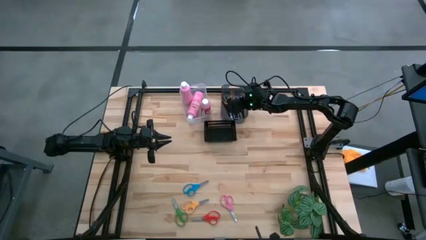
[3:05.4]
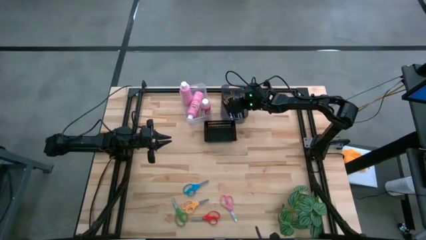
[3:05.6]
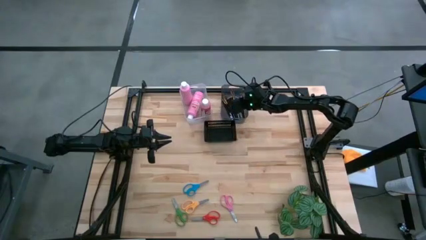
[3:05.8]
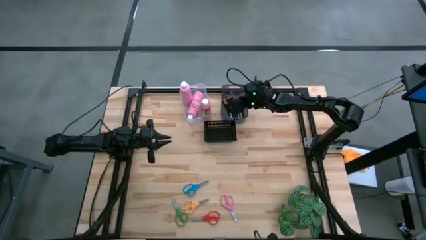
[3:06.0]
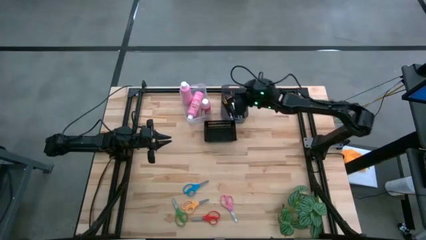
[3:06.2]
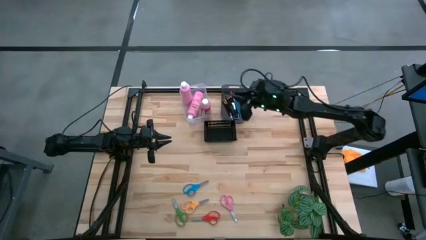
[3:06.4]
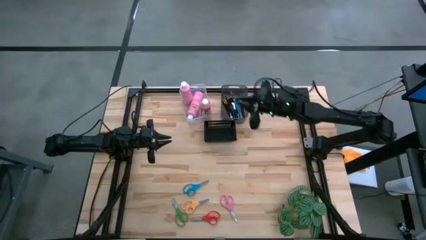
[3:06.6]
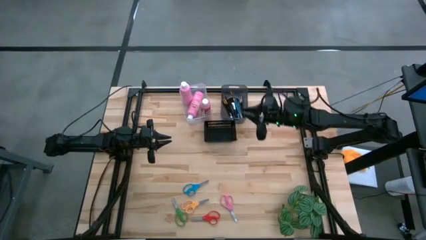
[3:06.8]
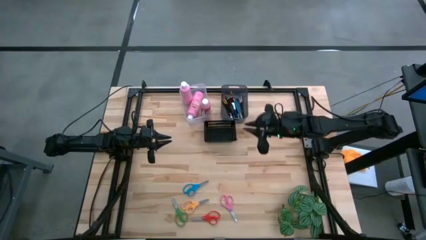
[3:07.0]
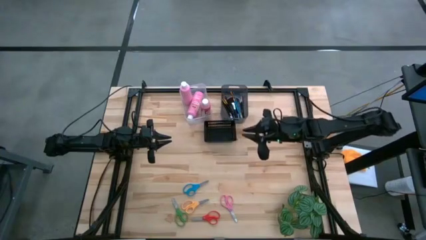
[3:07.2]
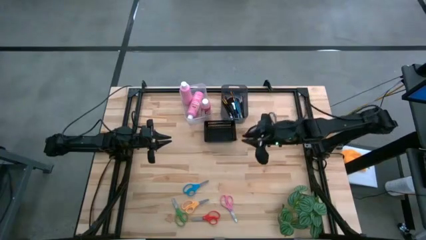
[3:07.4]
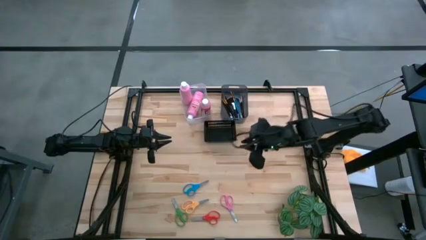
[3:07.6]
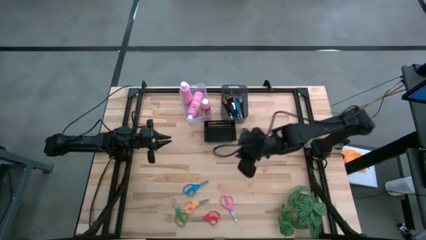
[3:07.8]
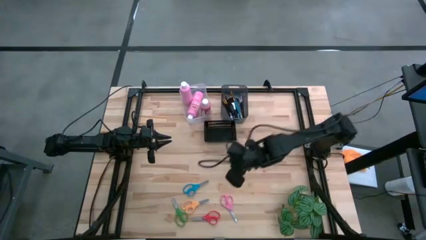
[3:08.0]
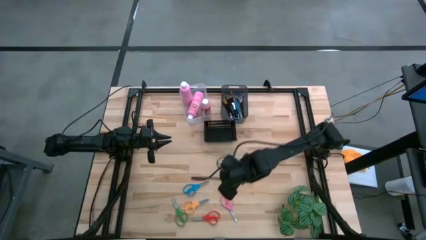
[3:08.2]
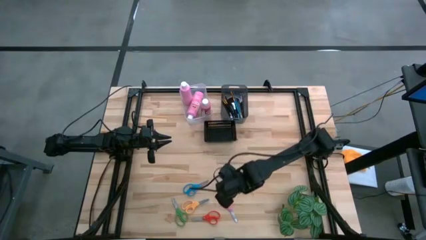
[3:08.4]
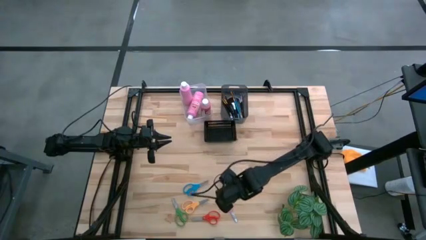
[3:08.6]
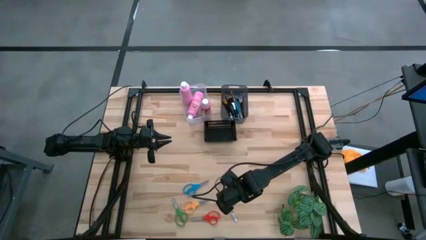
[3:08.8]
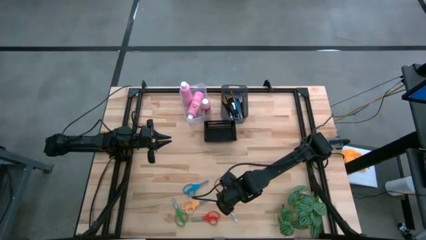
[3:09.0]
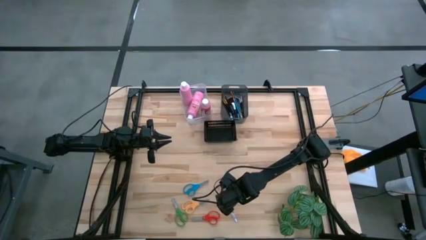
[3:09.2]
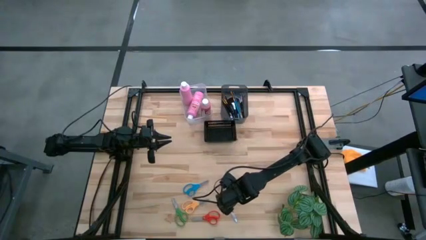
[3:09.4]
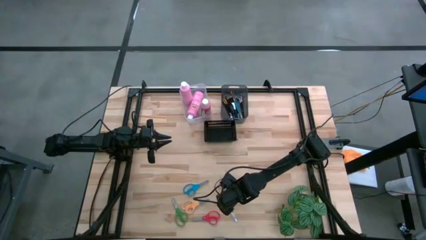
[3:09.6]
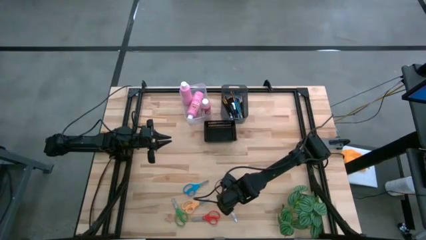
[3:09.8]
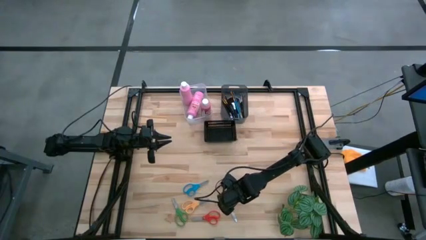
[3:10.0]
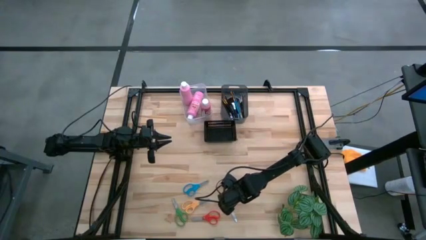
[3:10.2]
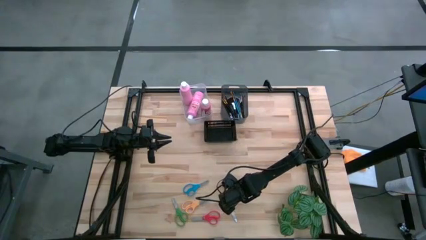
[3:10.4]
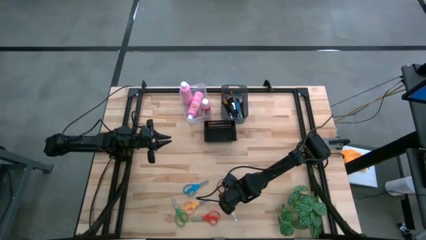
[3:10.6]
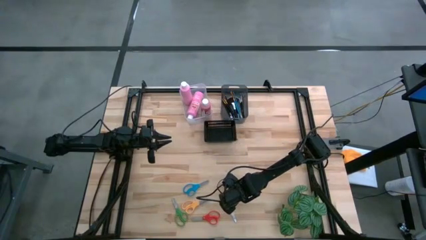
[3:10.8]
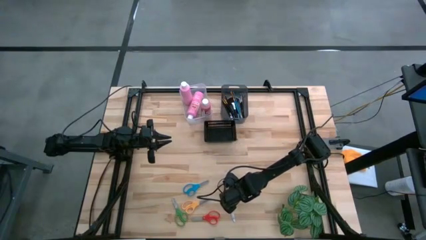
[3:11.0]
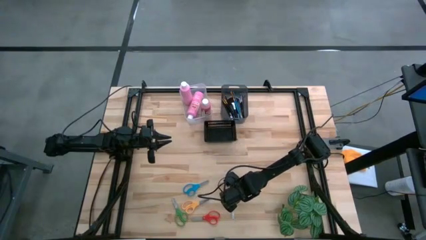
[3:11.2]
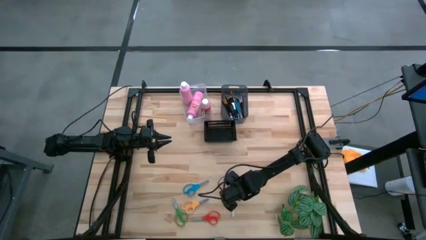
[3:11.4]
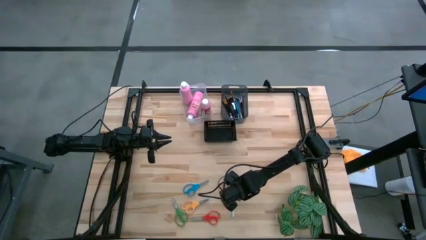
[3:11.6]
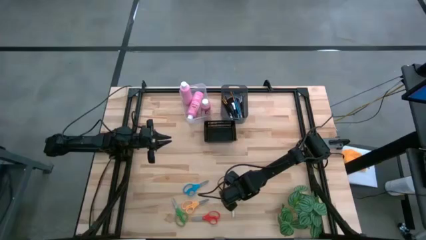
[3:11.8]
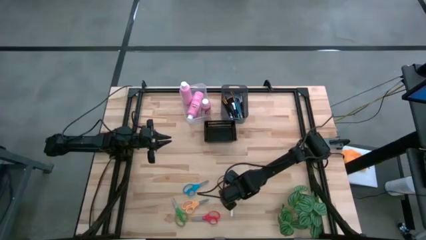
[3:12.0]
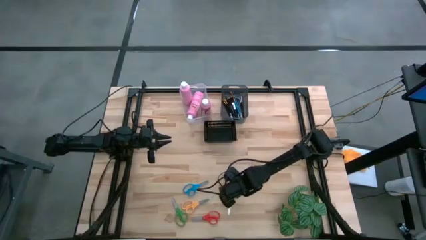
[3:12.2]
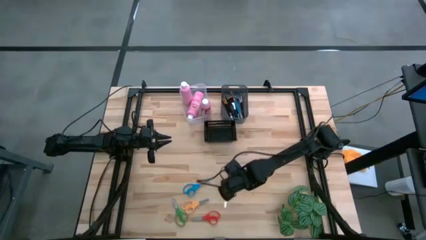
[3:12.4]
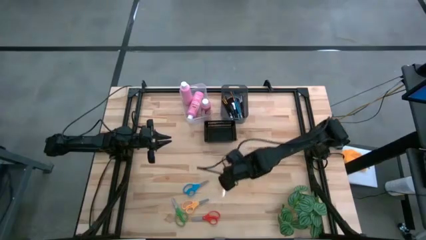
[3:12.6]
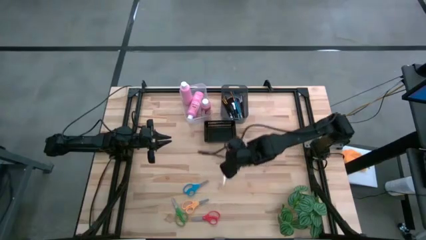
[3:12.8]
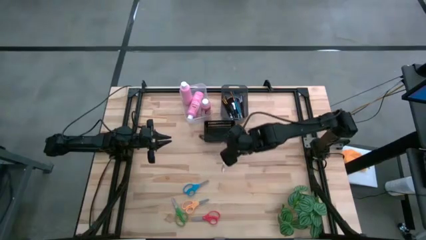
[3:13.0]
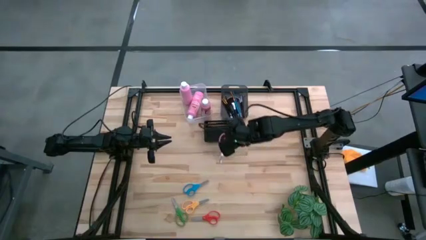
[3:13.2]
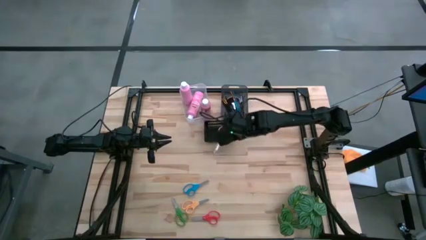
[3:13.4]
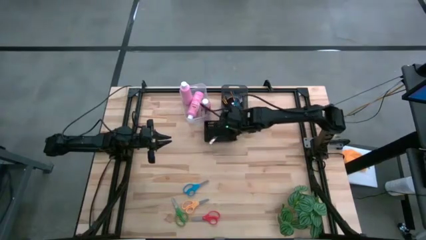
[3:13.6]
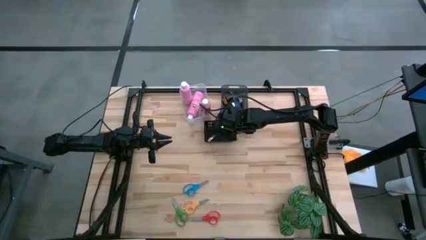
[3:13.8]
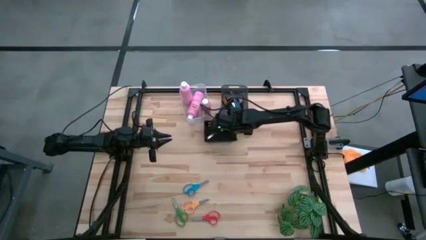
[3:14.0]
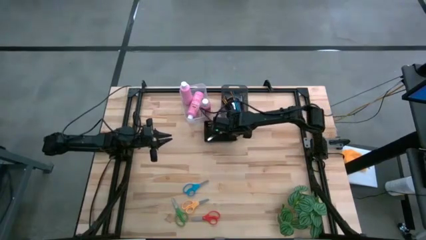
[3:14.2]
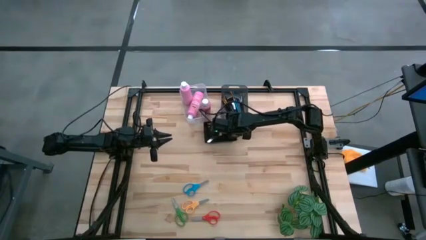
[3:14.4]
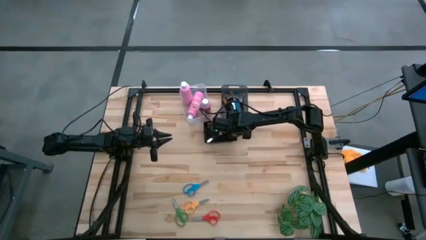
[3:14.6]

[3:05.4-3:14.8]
Task: Pick & Place Paint Supplies
Put the pink scissors into the black bin

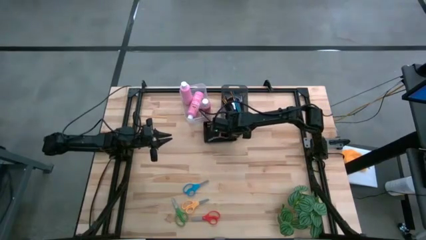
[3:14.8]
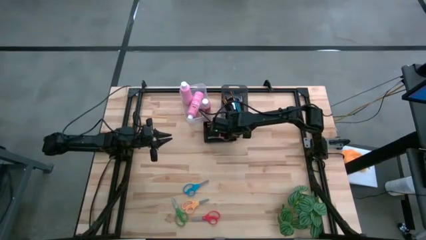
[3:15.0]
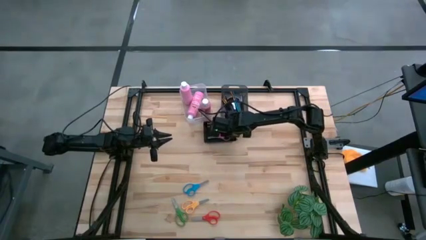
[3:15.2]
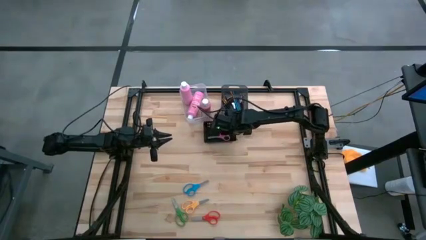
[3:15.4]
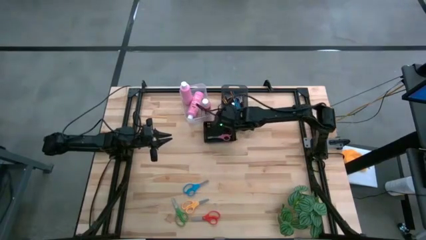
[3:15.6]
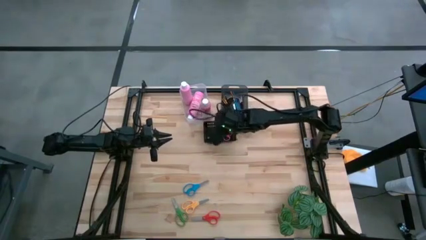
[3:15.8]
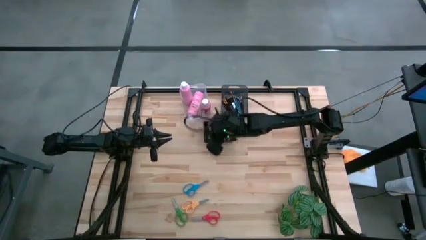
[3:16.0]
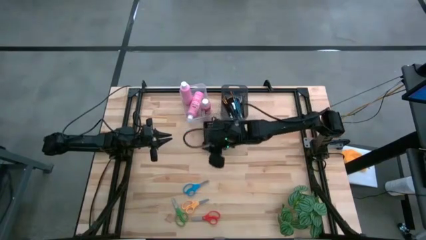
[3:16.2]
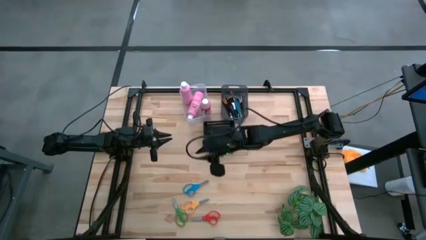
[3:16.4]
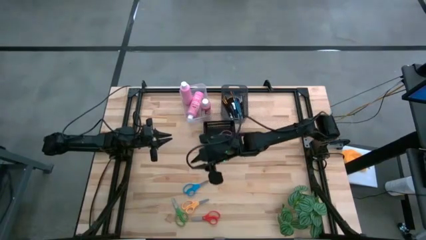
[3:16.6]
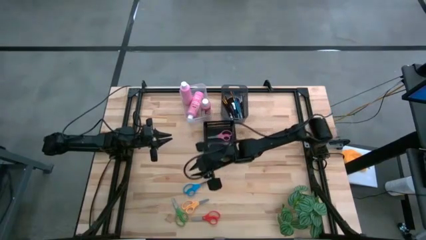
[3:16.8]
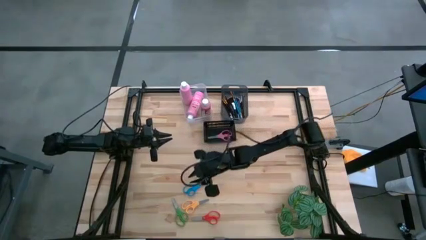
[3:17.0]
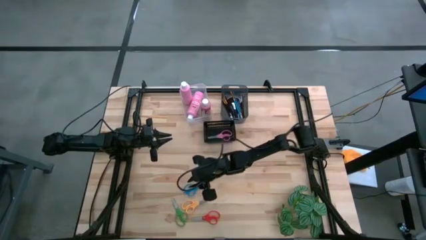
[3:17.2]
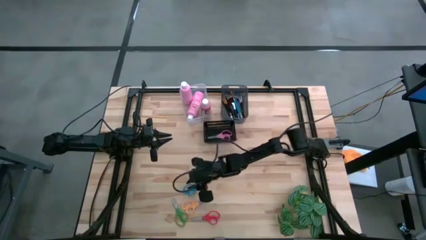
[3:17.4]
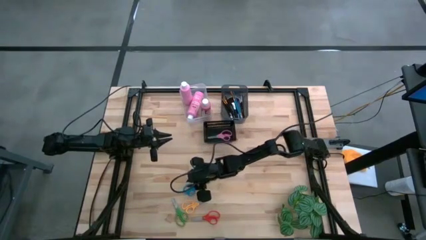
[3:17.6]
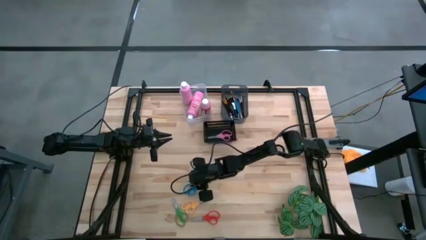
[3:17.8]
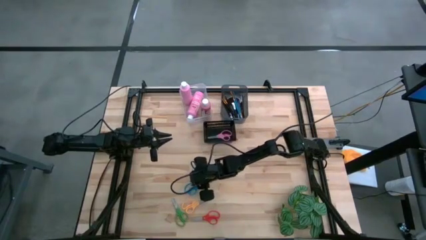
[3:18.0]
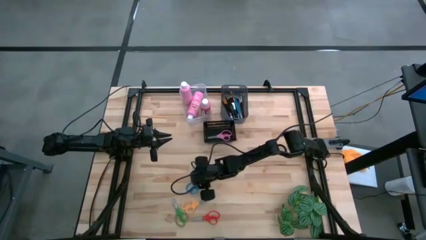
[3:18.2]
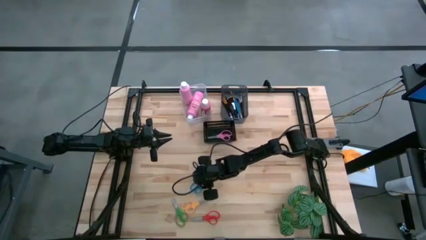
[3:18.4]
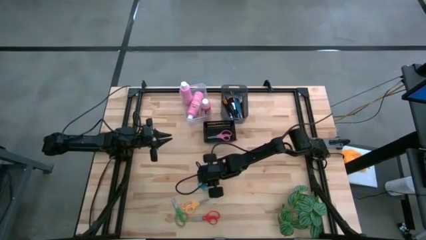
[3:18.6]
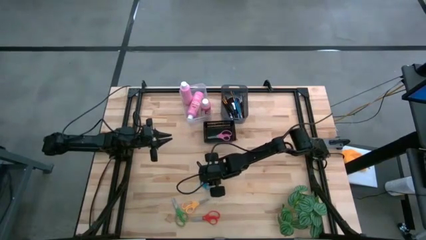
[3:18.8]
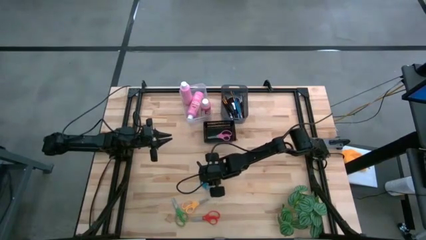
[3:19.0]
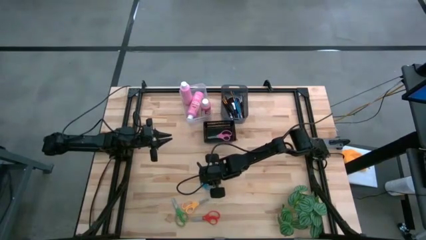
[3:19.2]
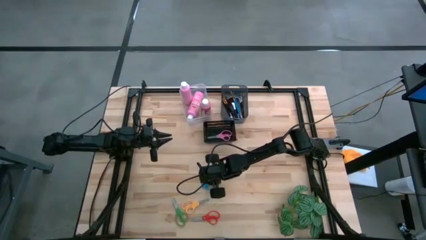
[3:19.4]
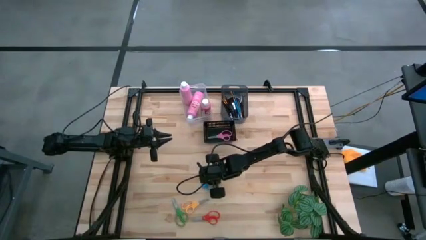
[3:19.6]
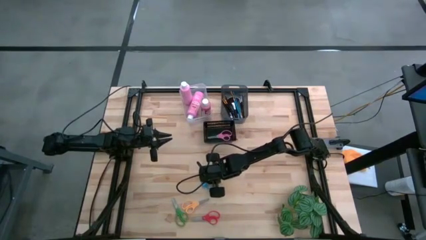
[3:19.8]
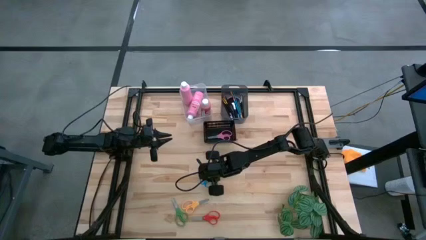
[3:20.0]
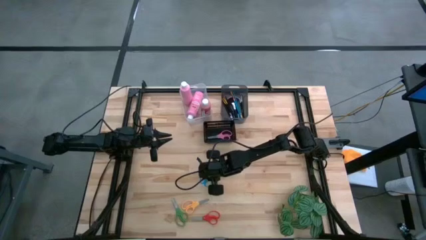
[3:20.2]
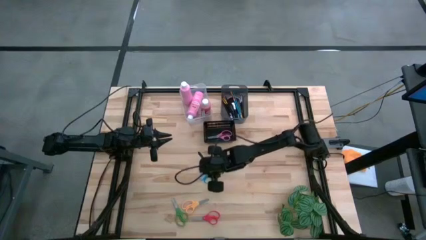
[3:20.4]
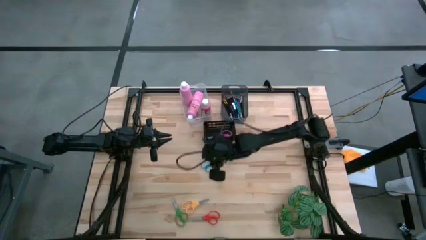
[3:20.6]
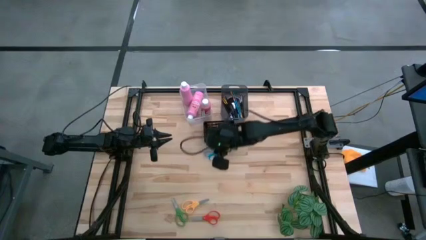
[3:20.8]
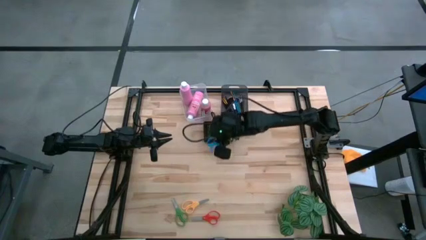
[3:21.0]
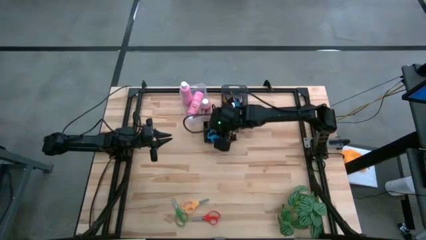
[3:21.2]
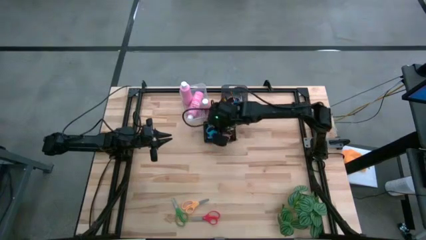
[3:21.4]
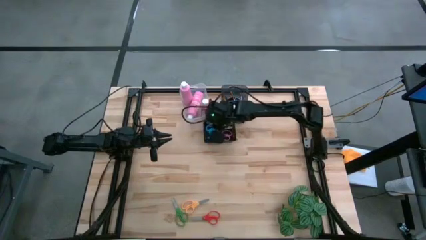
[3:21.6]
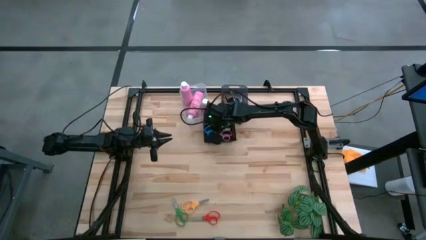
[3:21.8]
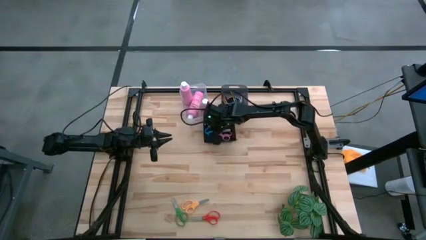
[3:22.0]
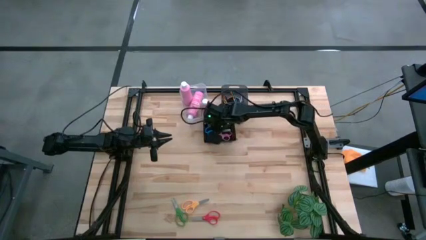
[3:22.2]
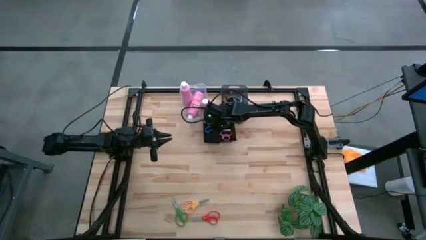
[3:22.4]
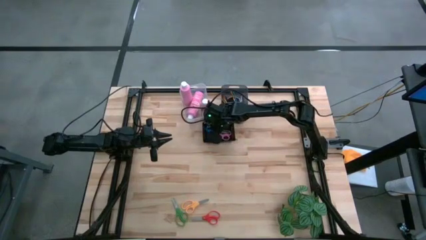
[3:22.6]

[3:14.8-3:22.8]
Put the blue scissors into the black bin
